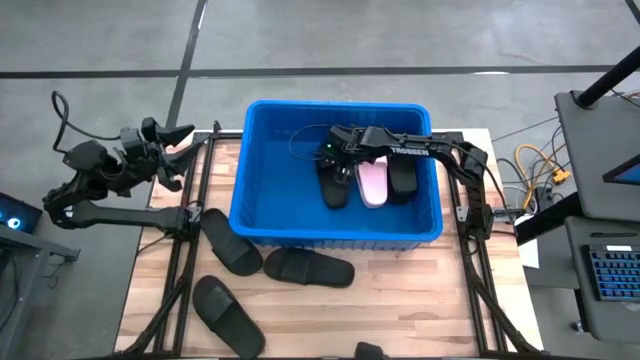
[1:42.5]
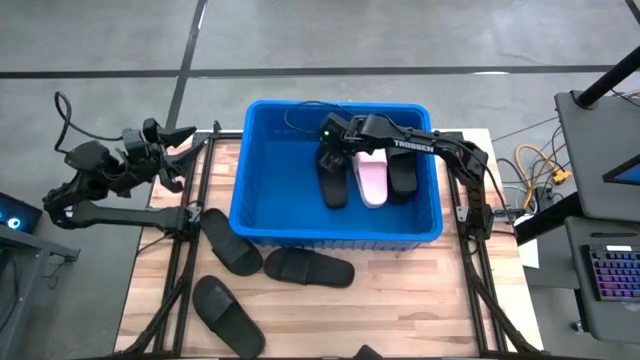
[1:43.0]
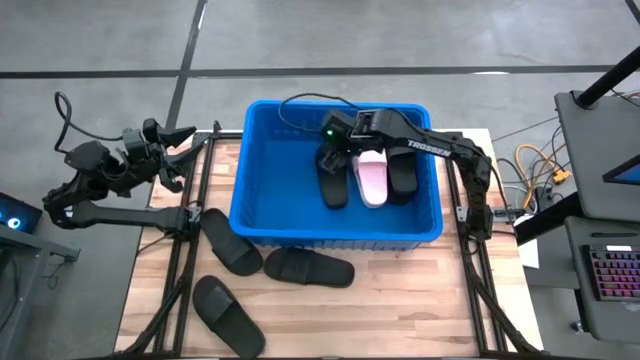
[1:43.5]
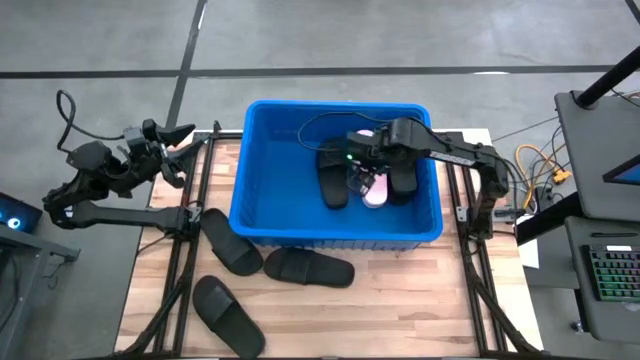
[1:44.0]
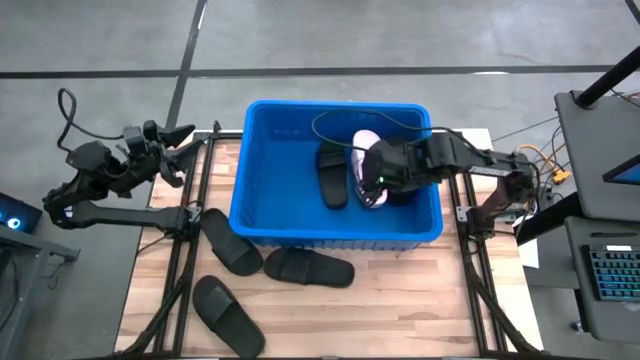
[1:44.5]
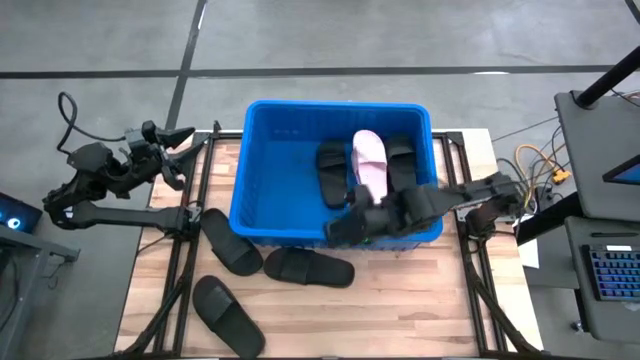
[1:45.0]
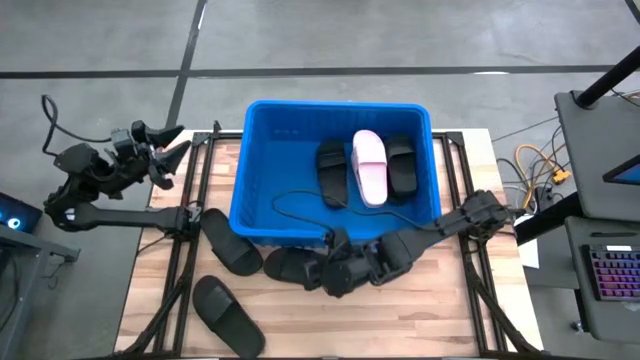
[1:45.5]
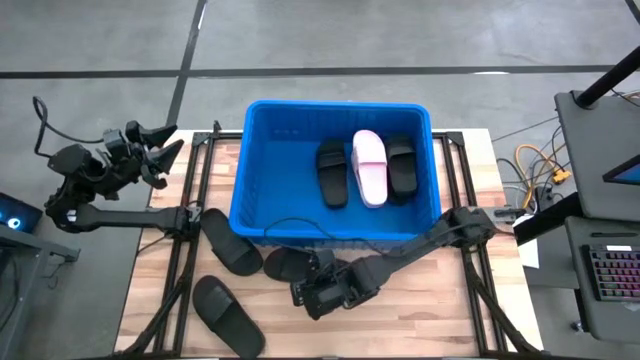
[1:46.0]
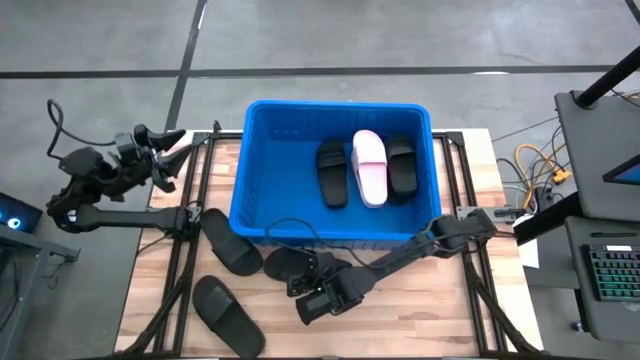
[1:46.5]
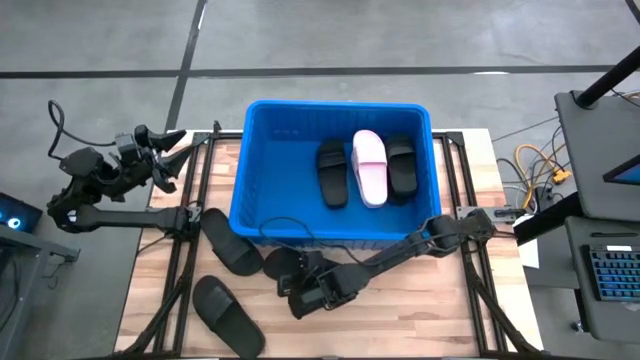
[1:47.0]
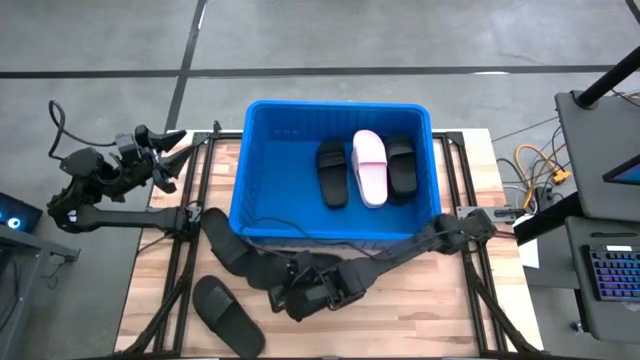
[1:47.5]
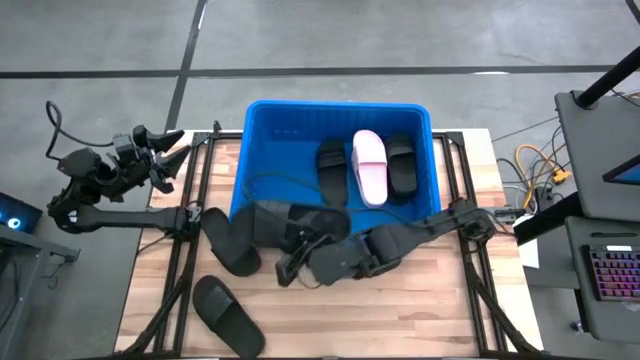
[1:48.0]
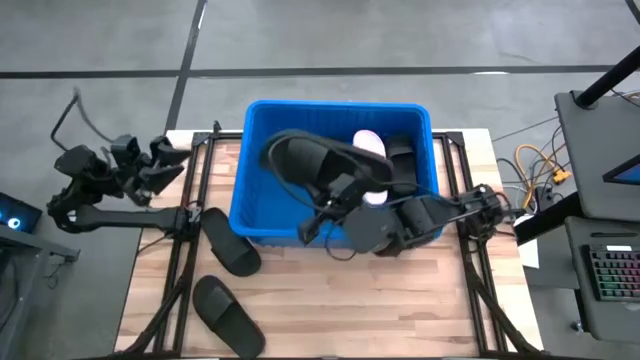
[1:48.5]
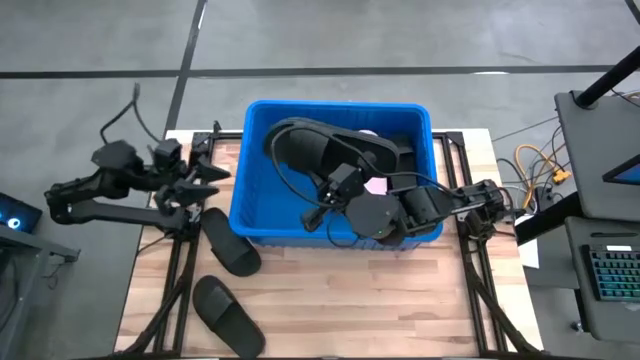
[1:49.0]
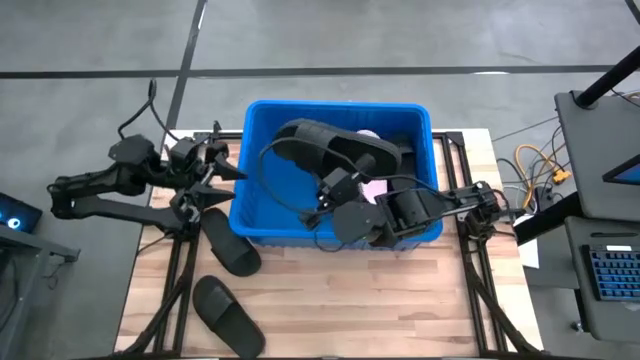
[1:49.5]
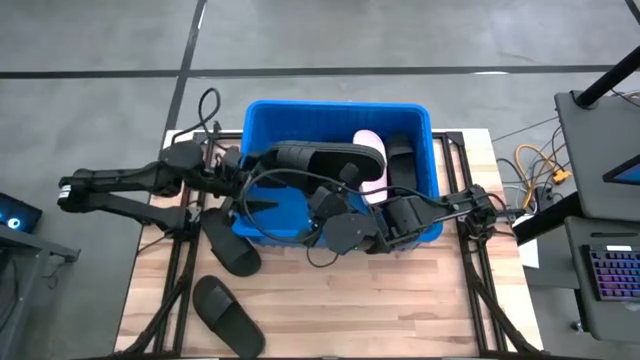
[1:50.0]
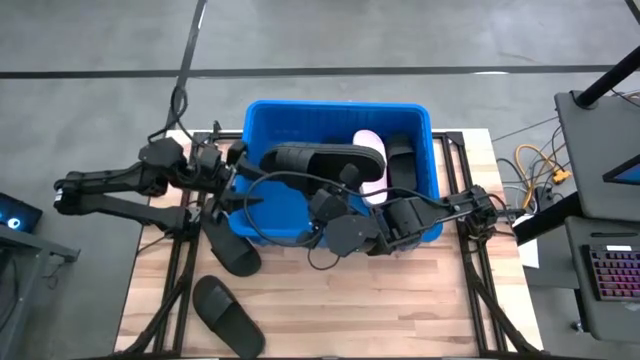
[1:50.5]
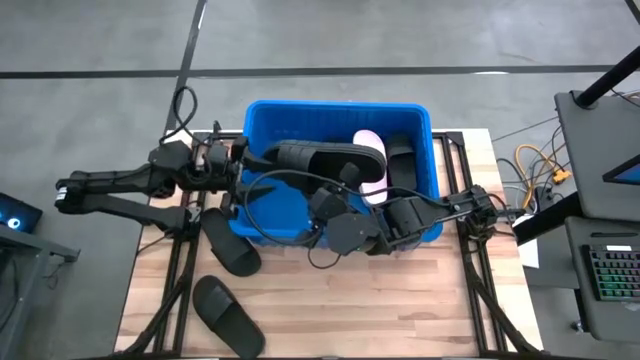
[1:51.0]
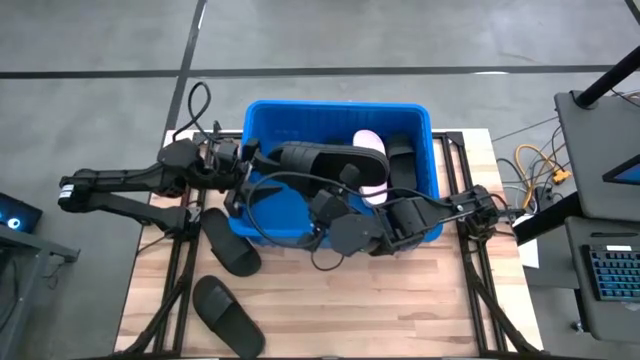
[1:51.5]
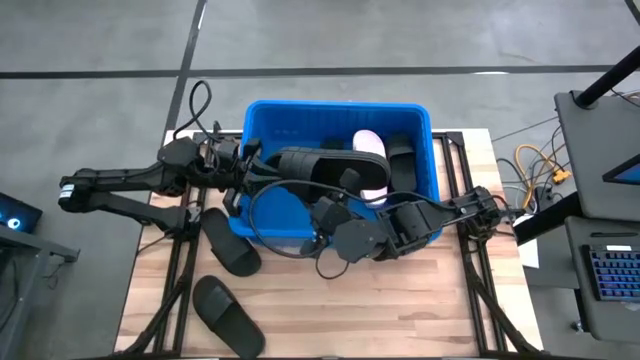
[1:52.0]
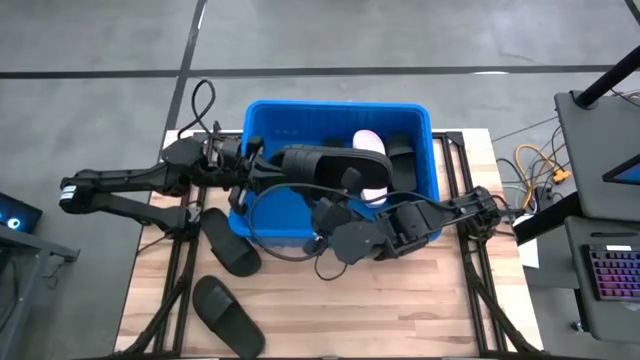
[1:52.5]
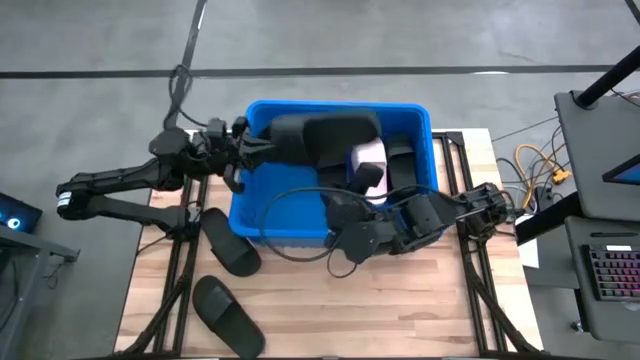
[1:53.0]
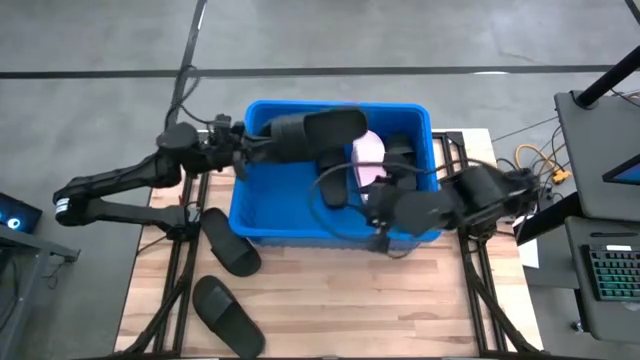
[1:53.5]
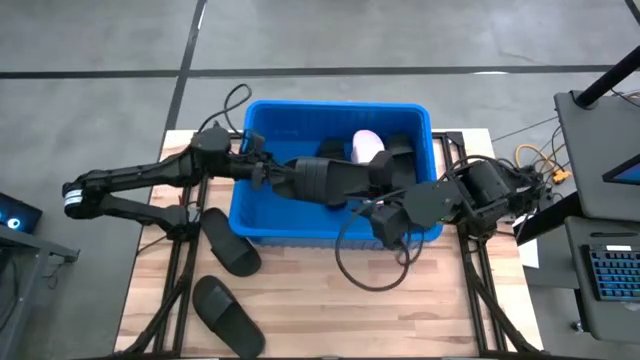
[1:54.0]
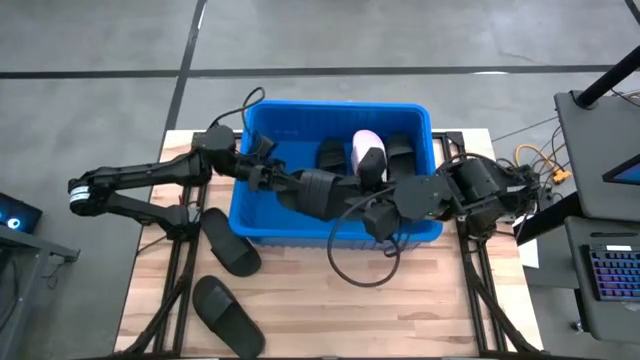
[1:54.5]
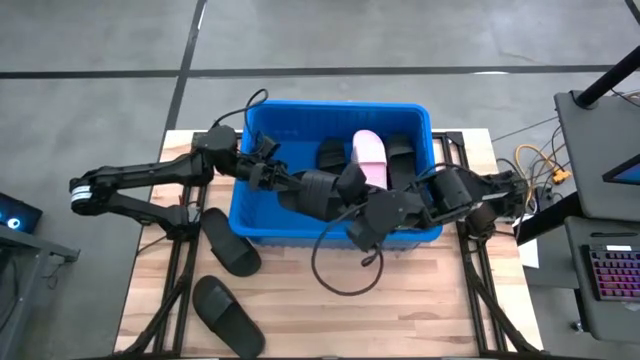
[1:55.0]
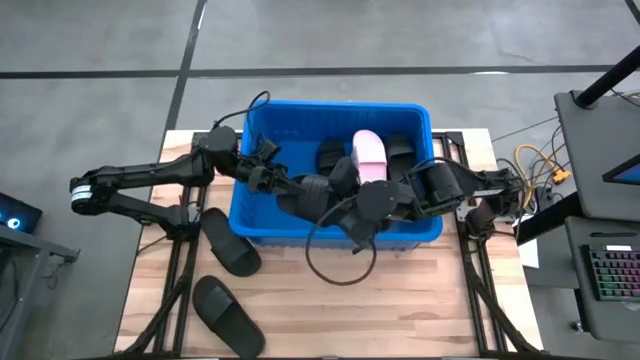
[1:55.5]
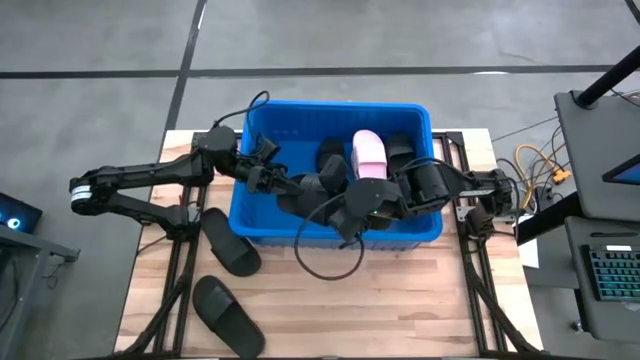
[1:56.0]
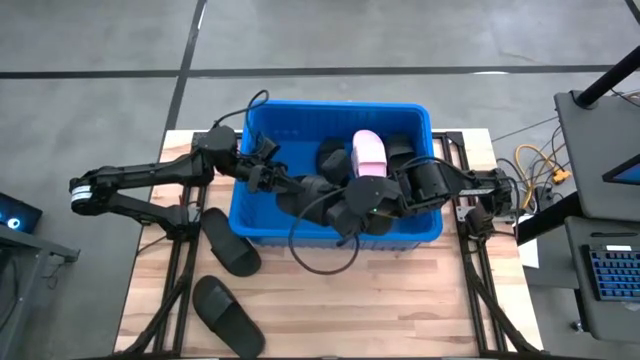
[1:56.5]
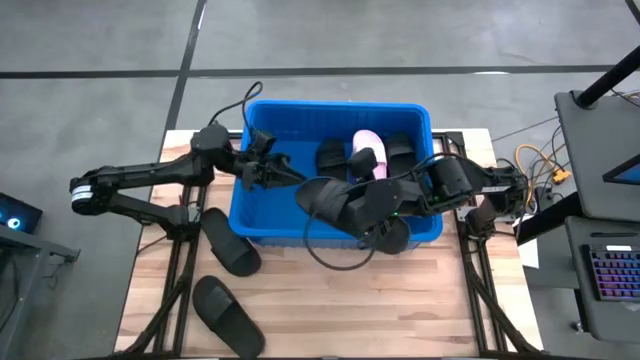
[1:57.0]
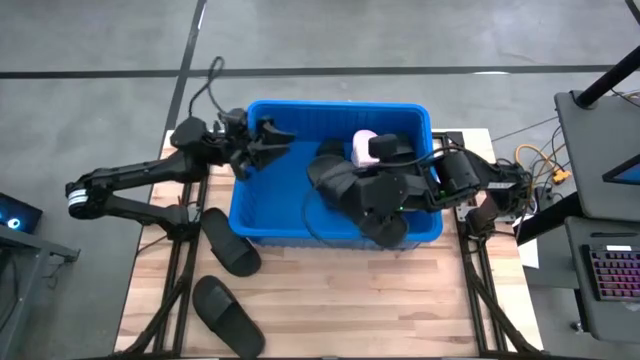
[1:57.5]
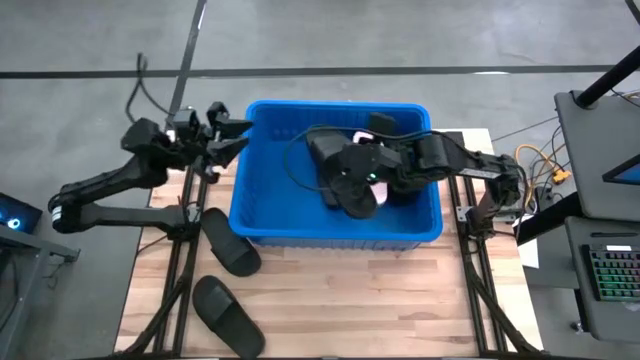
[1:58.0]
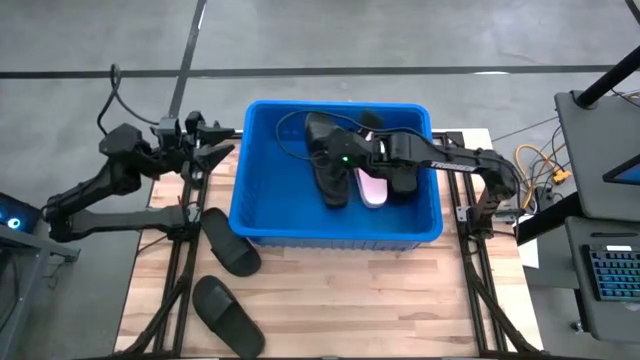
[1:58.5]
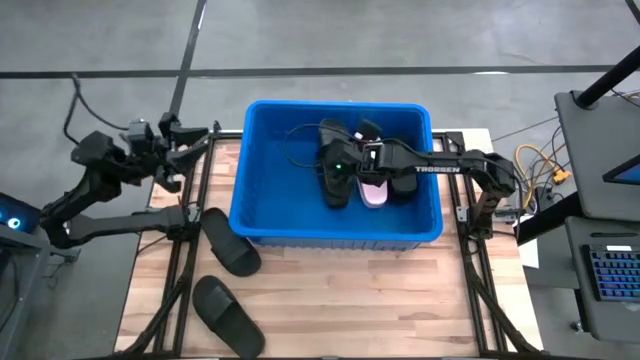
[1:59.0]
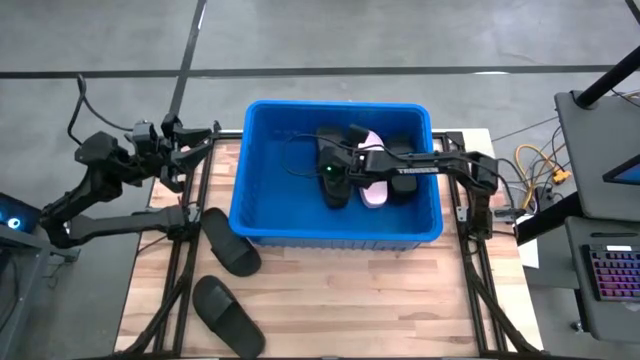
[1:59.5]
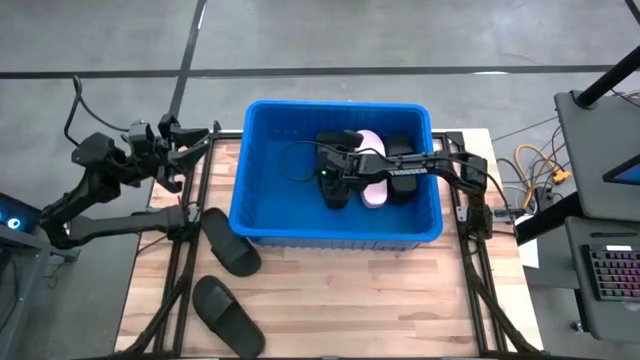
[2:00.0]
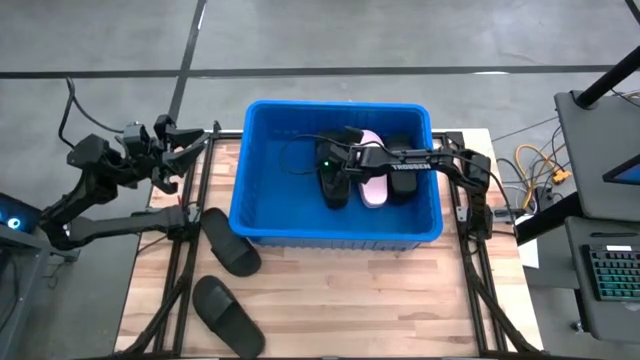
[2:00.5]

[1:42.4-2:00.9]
Task: Pick and place slides into bin
Put the black slide into the blue container

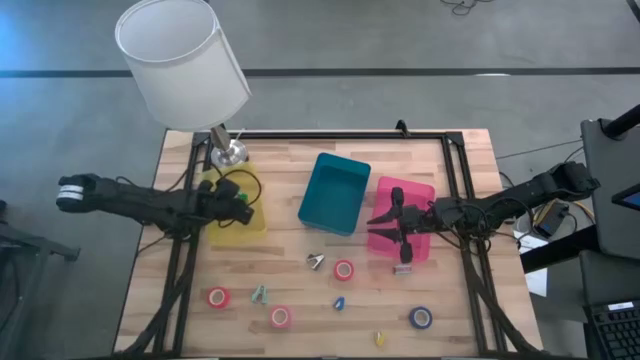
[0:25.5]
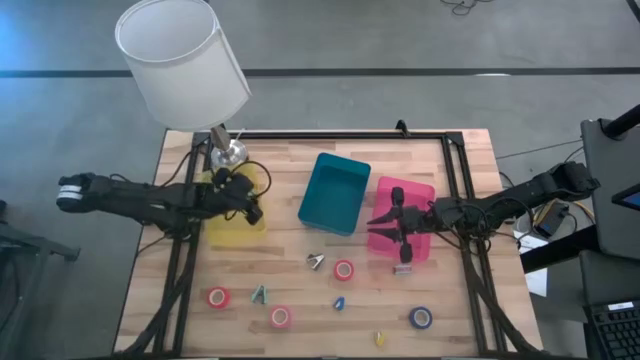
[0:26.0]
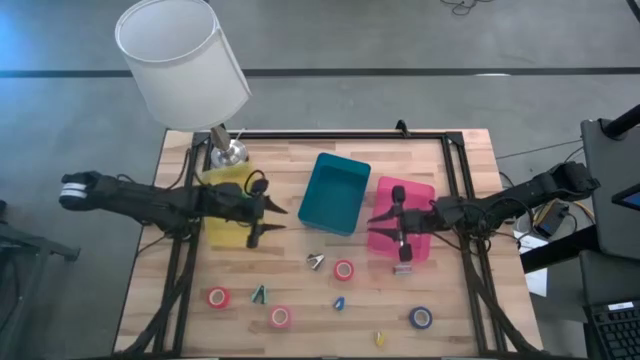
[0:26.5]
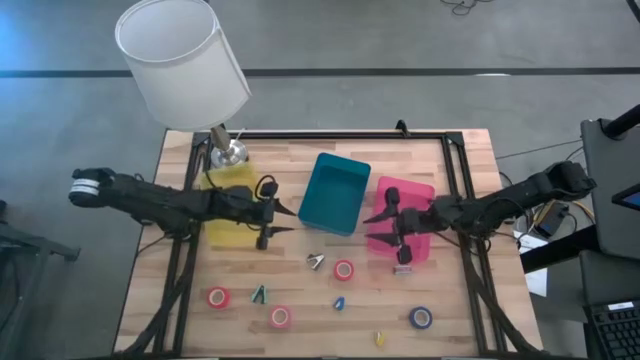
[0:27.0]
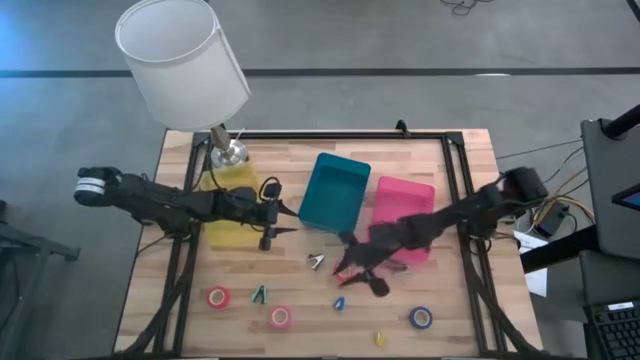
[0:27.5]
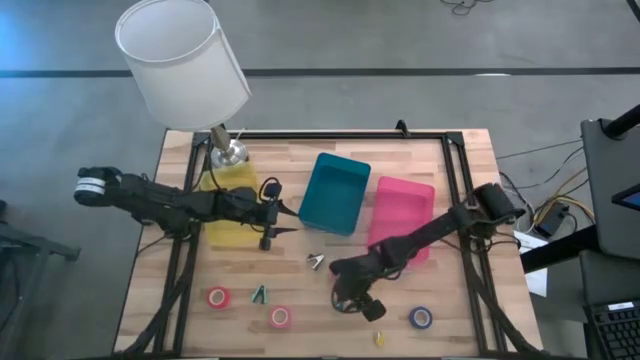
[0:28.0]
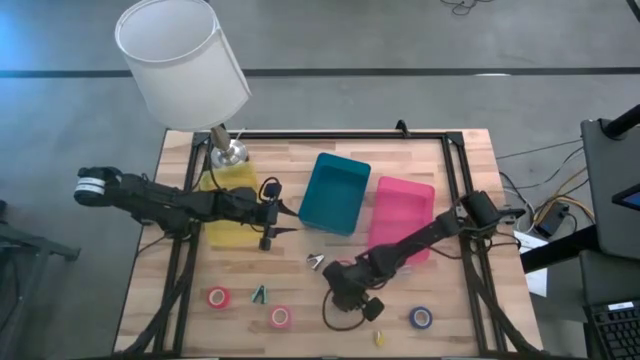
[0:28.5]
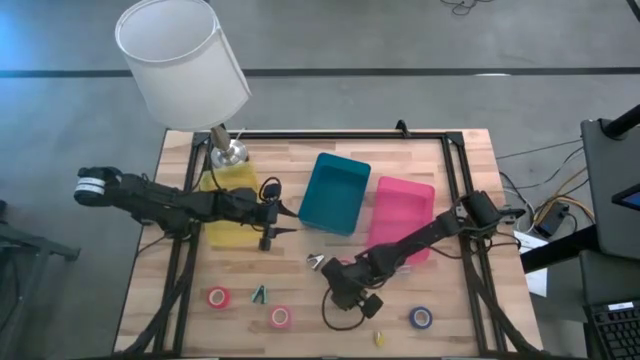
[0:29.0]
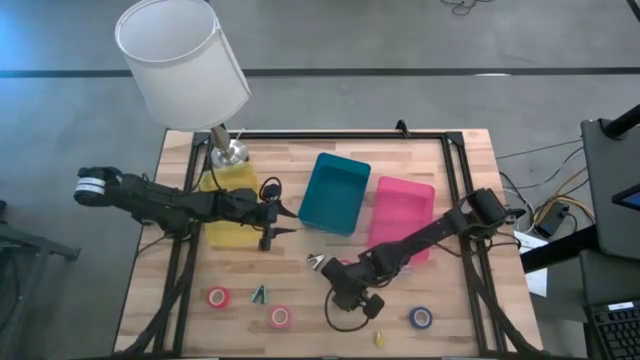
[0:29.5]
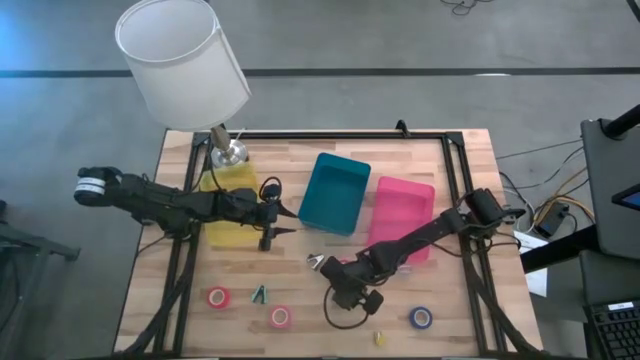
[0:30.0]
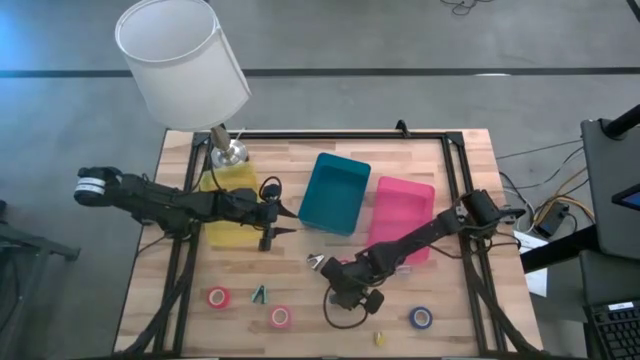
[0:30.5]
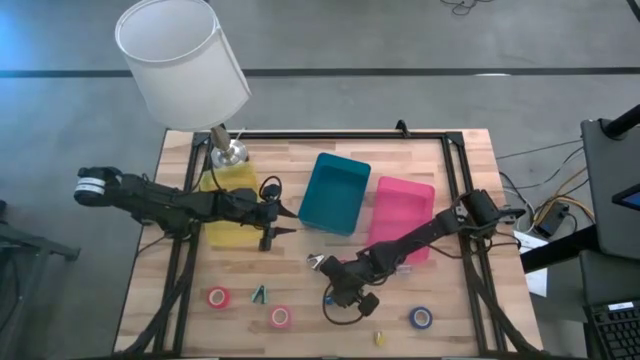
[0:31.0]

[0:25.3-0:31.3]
Task: Pick and place Stapler, Stapler remover, tape
Put the blue stapler into the yellow bin
